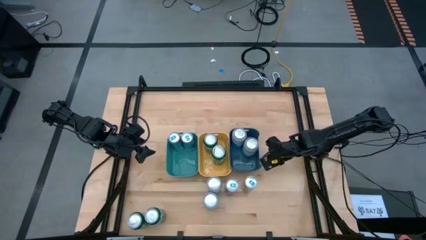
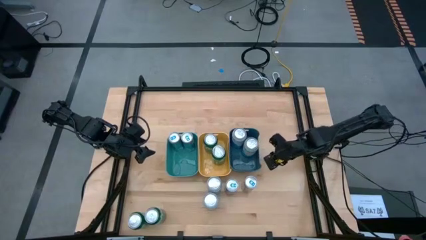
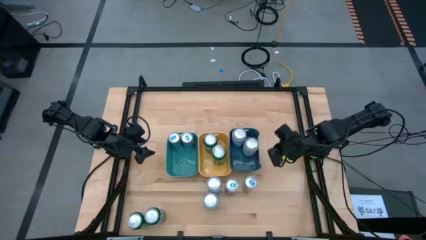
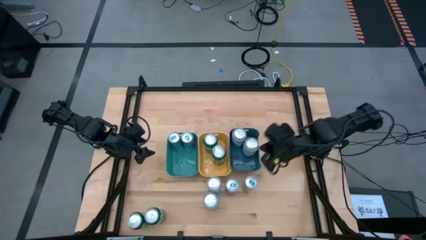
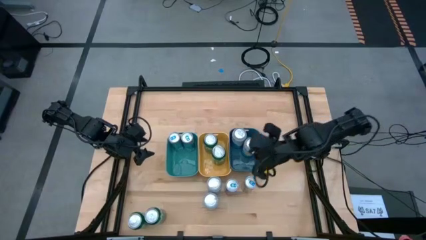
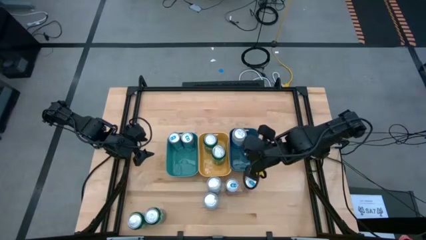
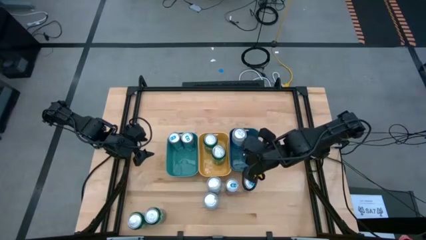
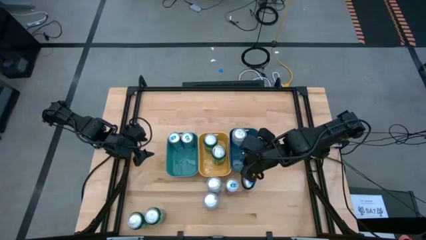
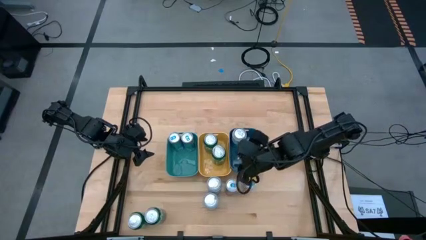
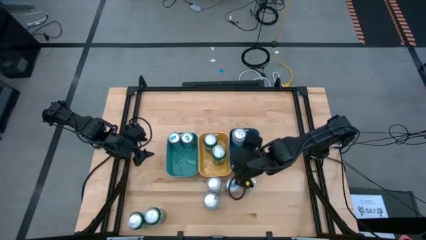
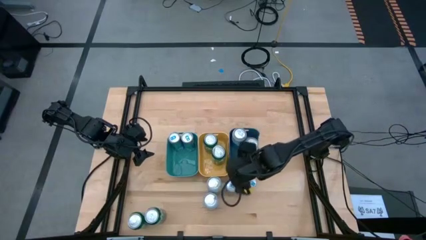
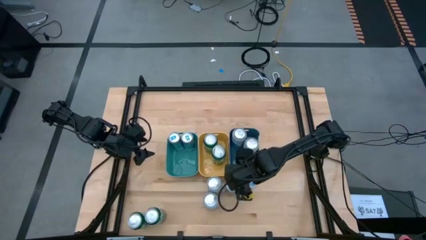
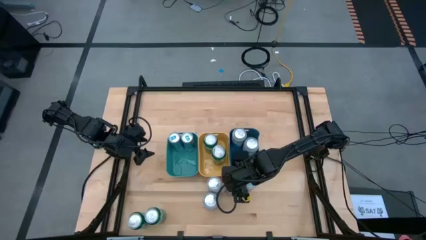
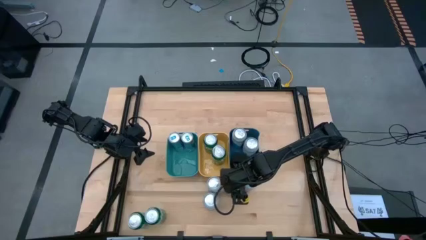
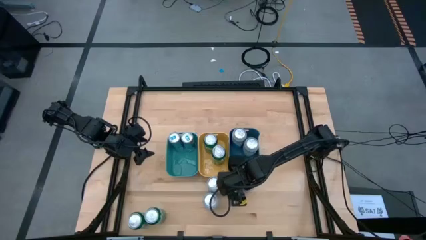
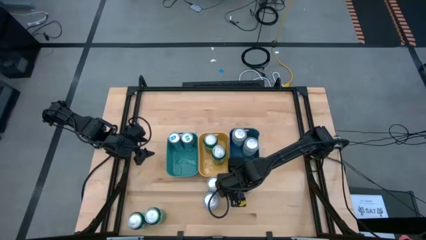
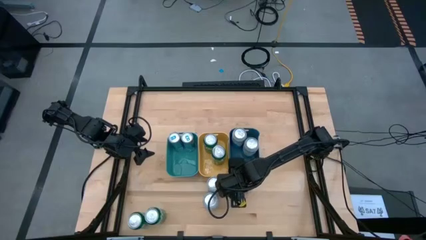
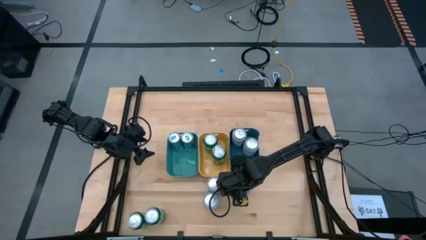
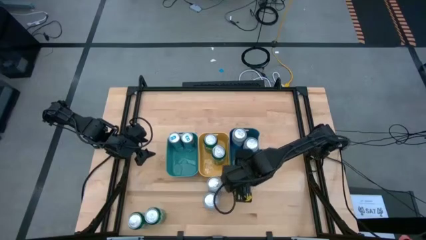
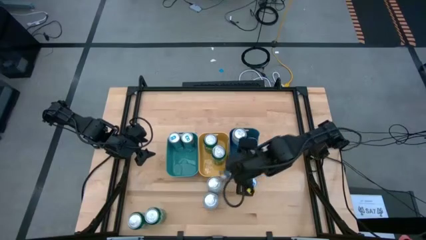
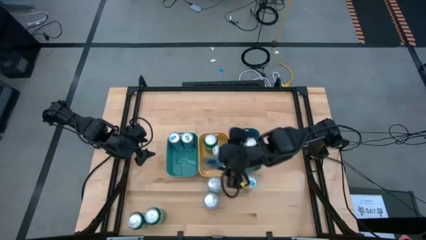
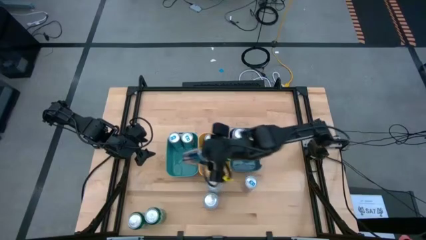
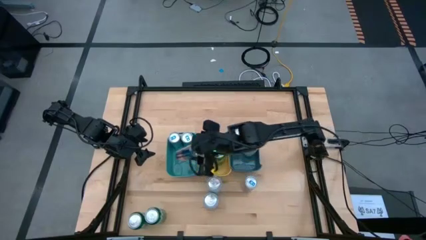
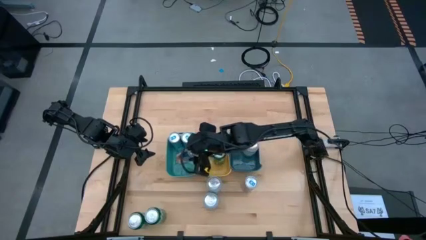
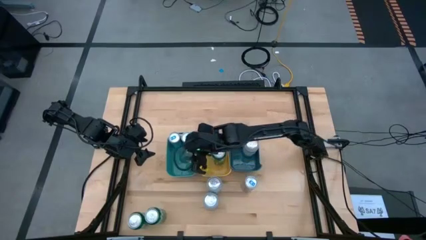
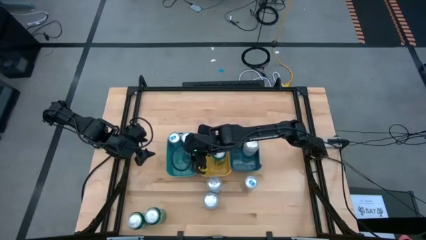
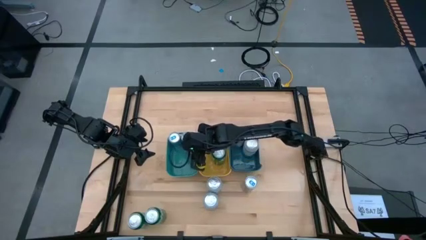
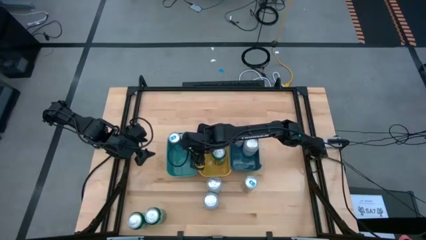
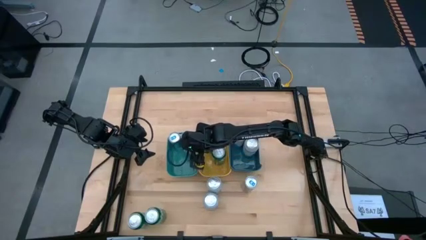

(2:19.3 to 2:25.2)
Task: Sort soda cans
Put the white and blue soda can into the light blue bin

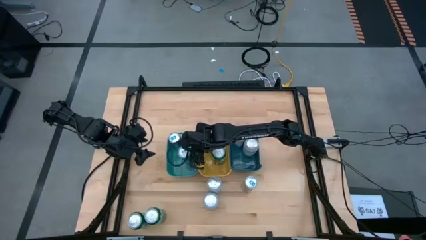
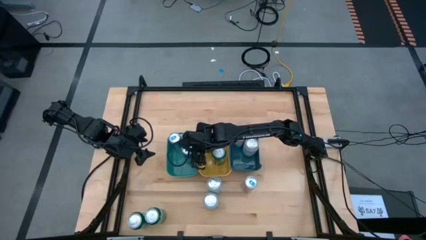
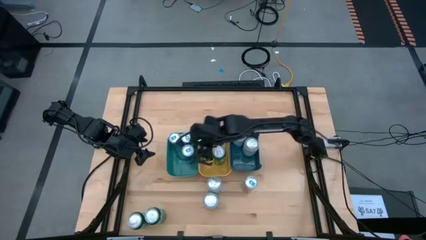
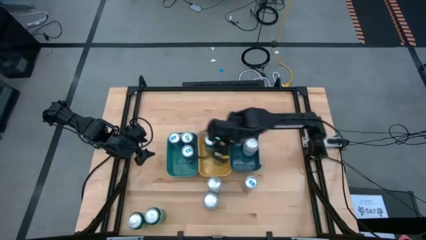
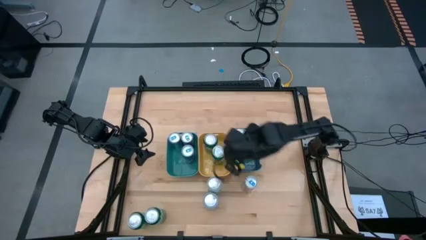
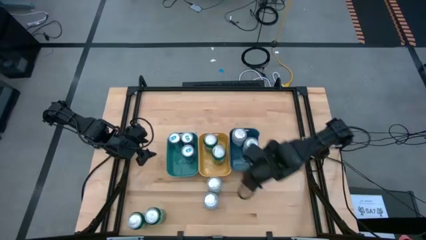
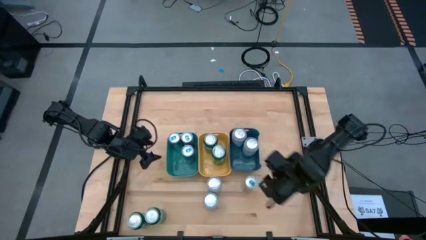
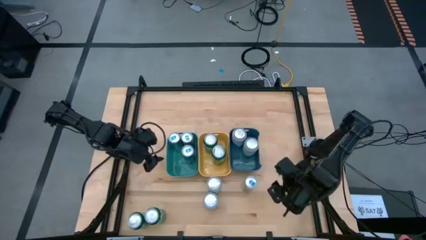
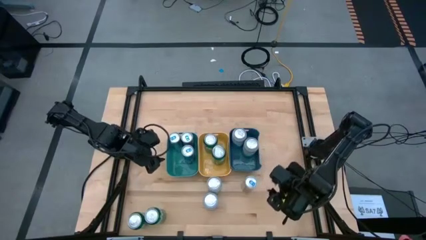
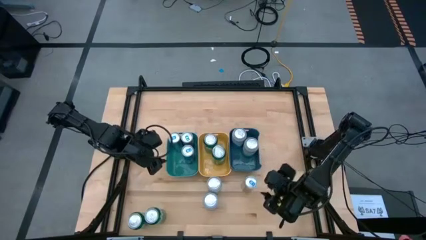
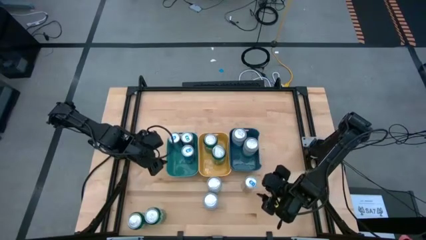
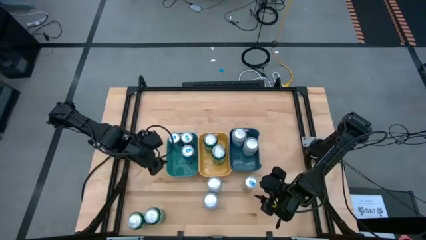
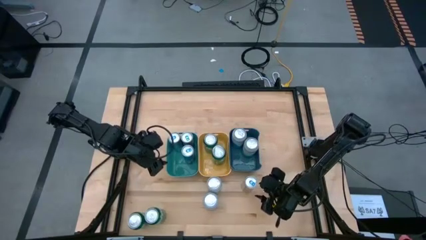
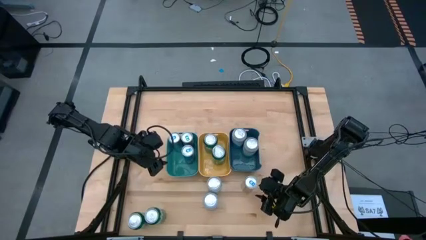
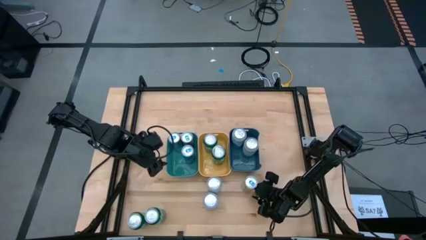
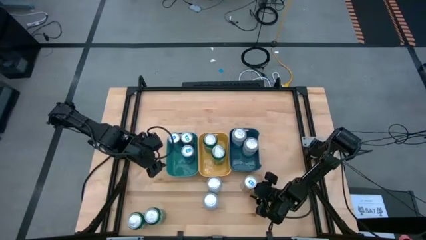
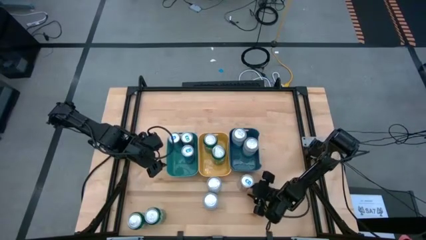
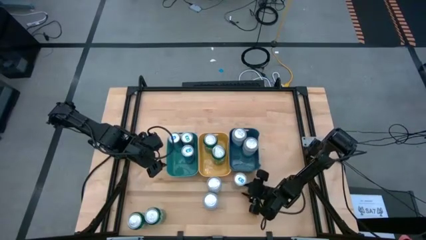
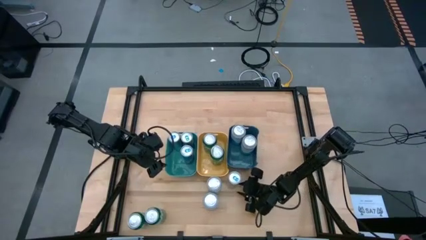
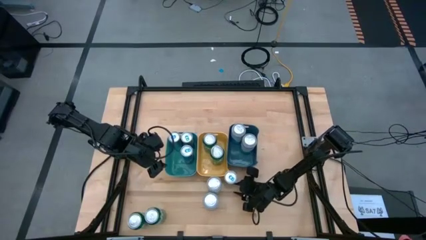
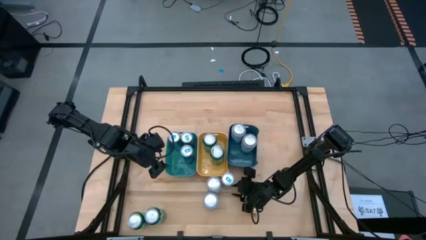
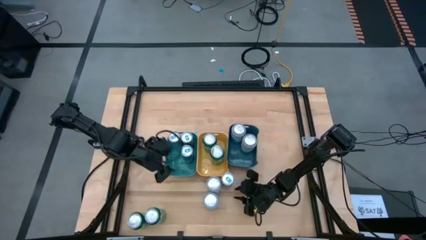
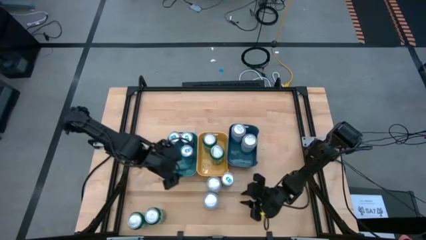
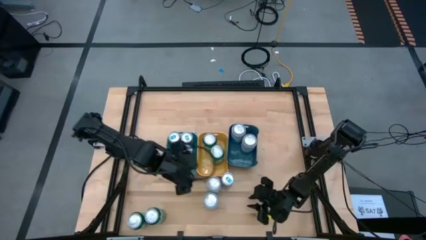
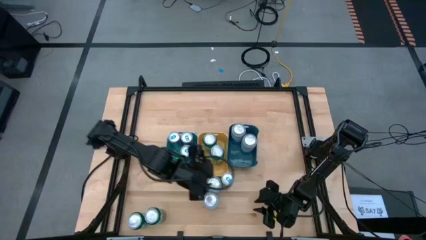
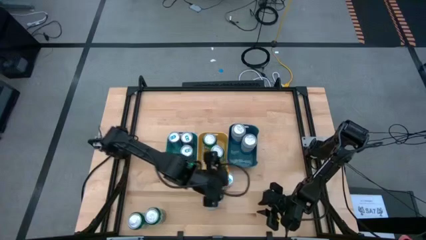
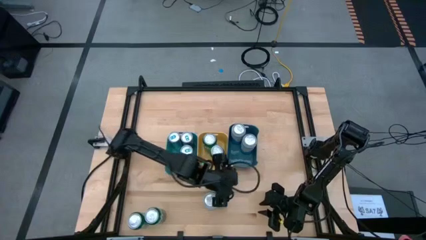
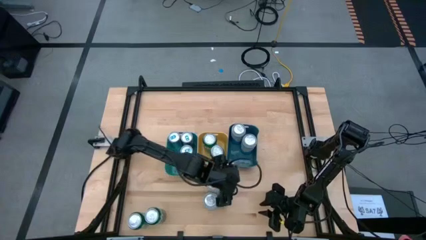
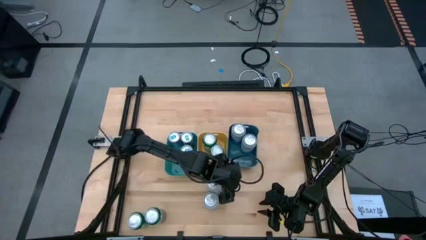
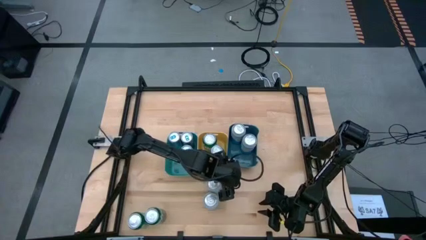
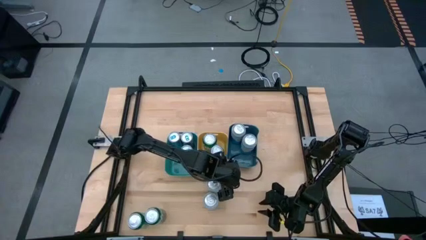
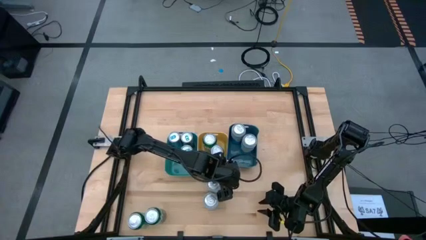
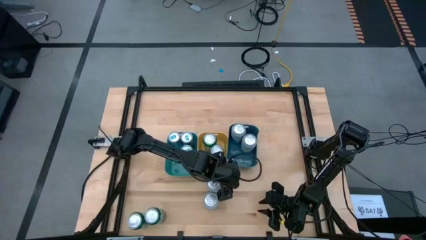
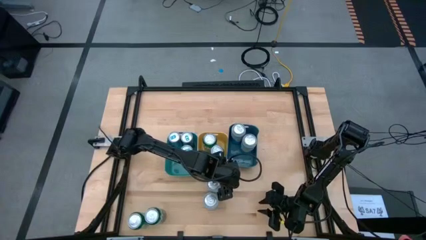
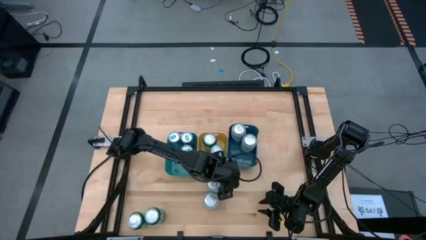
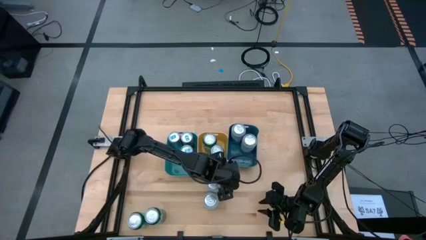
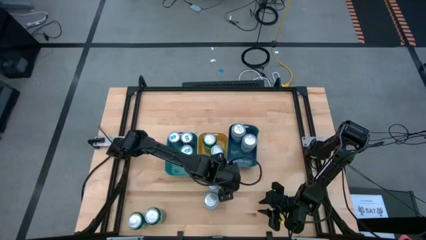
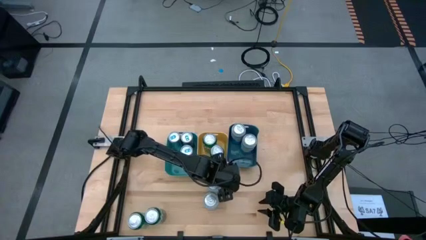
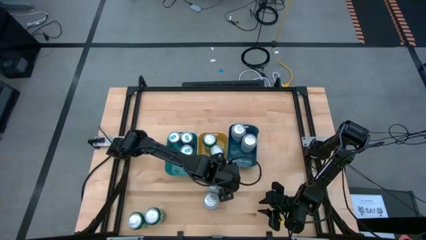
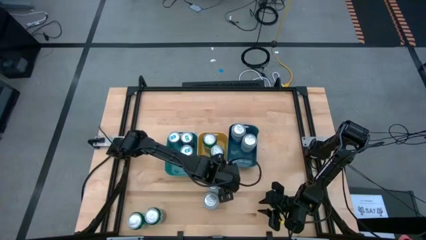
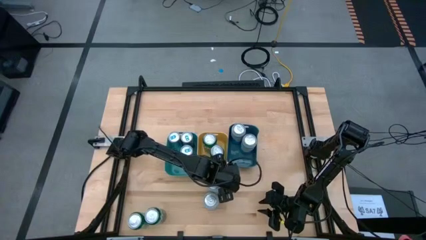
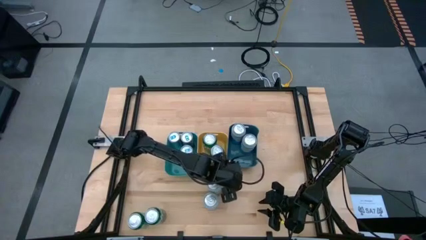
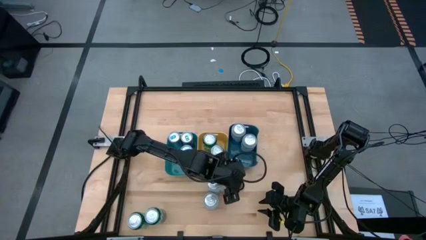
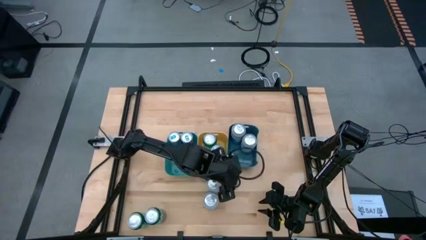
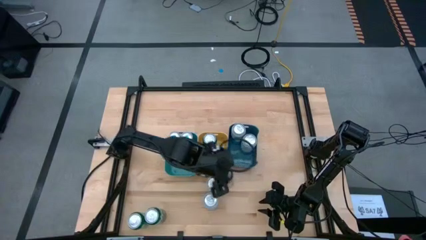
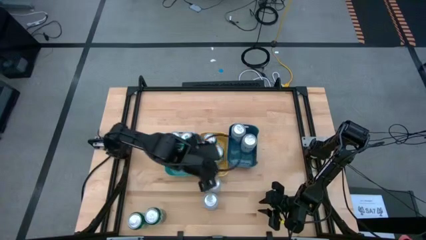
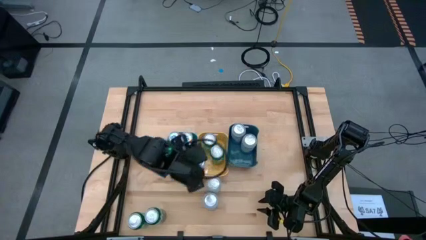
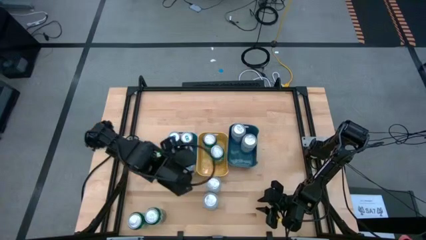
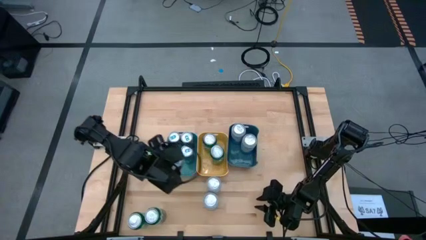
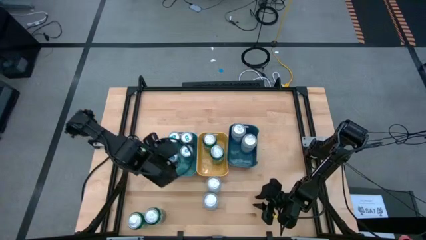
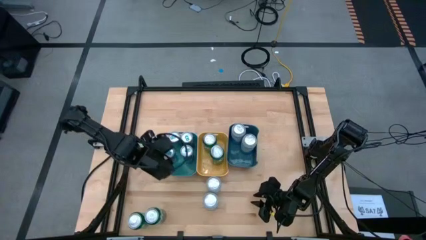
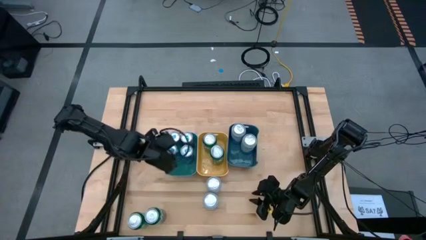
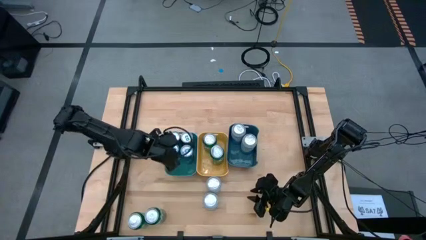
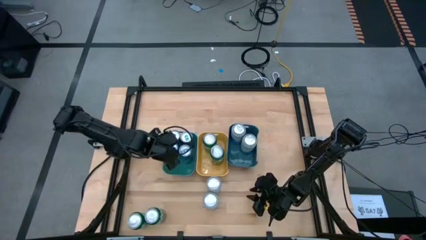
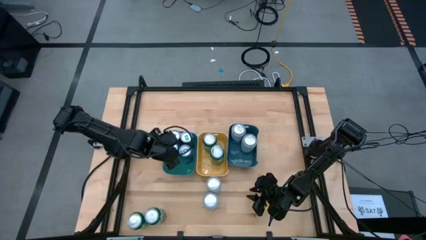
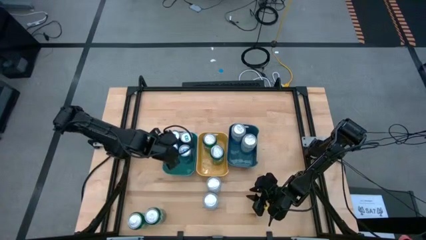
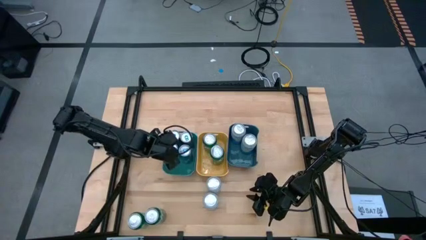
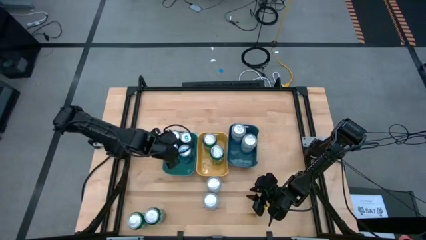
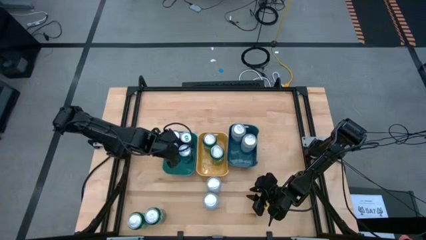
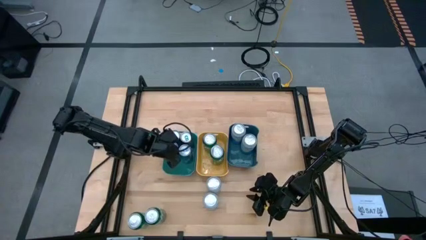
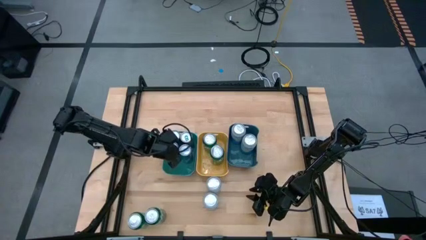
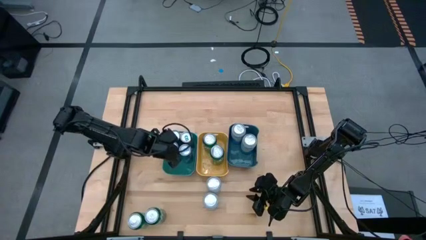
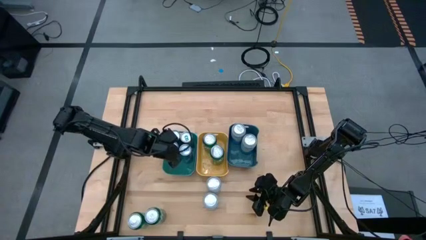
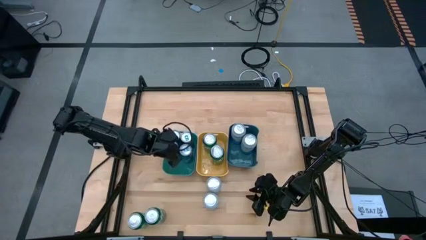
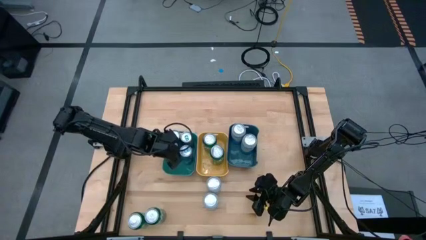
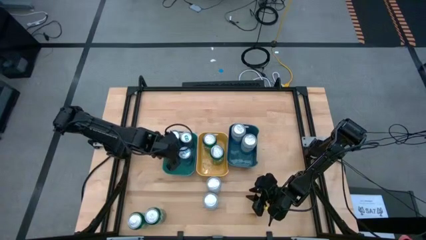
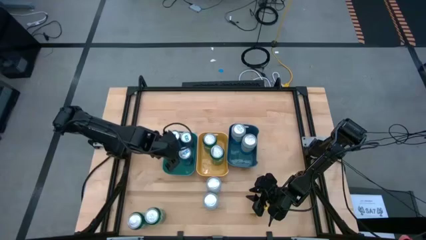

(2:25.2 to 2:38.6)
Put the white and blue soda can into the light blue bin
